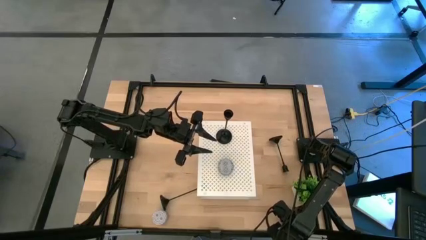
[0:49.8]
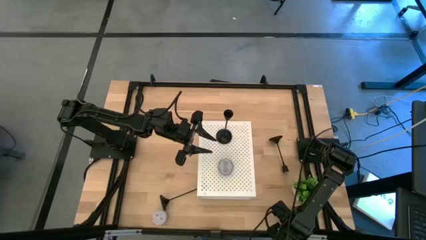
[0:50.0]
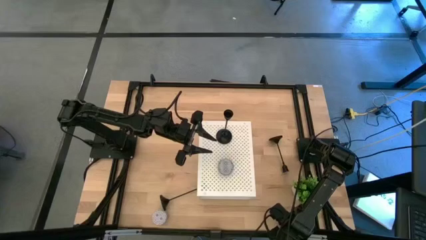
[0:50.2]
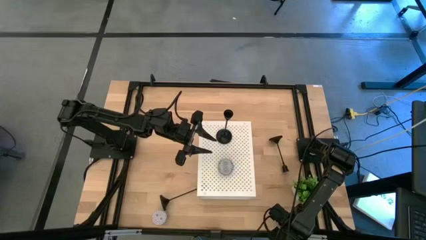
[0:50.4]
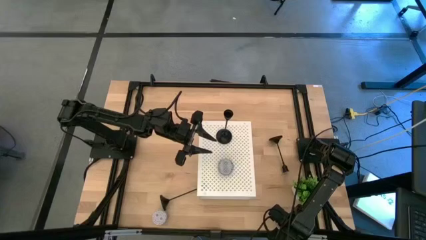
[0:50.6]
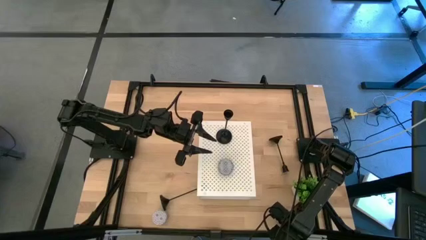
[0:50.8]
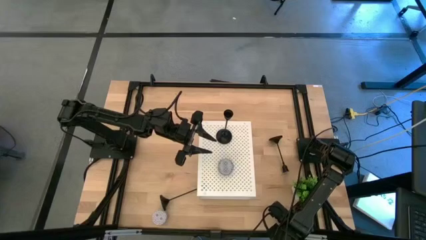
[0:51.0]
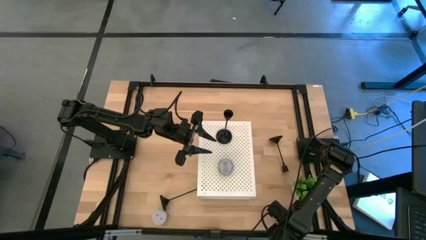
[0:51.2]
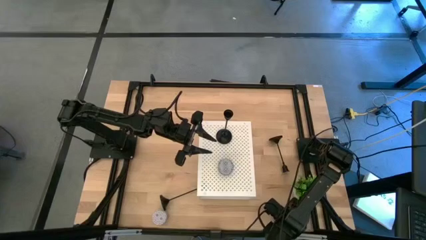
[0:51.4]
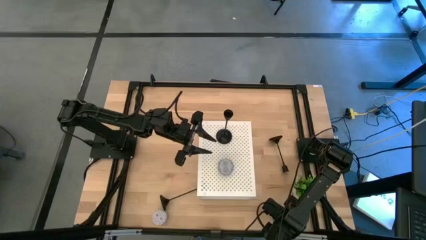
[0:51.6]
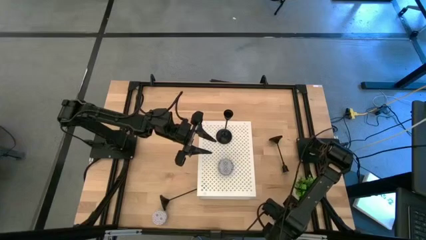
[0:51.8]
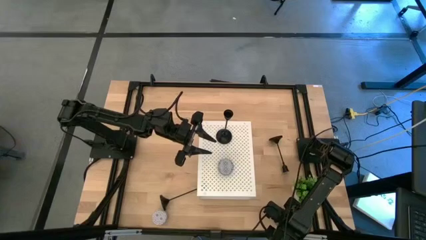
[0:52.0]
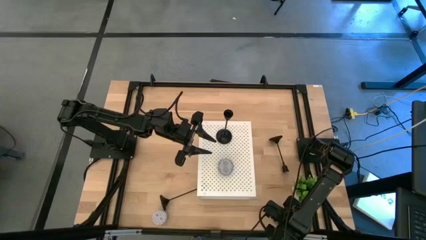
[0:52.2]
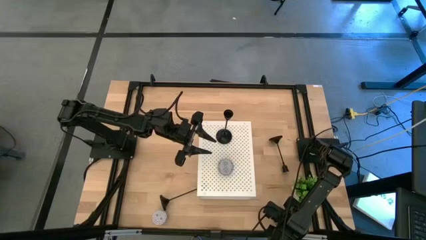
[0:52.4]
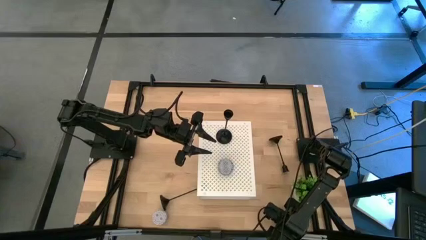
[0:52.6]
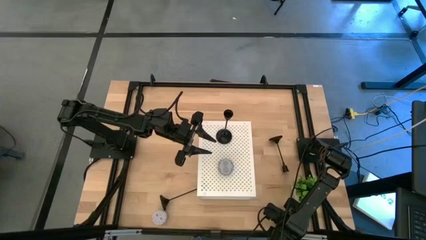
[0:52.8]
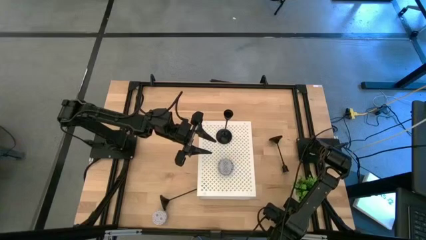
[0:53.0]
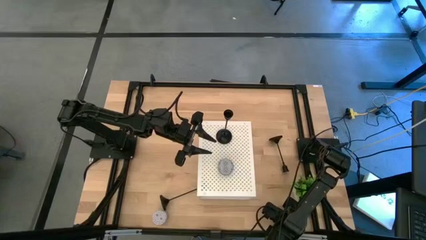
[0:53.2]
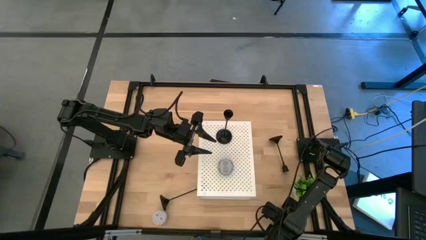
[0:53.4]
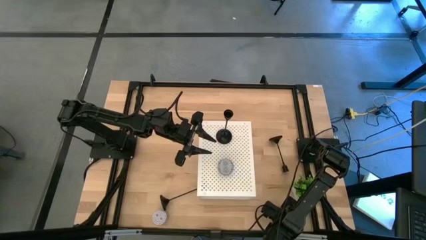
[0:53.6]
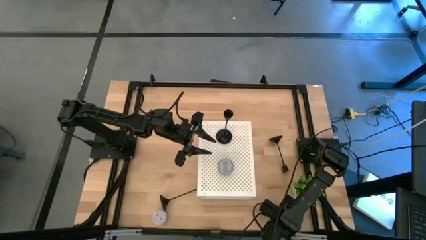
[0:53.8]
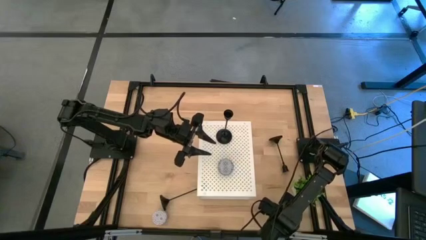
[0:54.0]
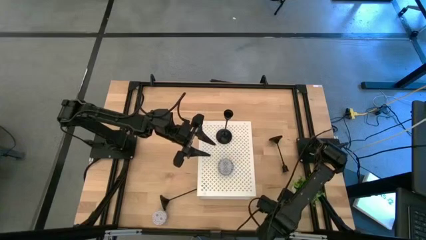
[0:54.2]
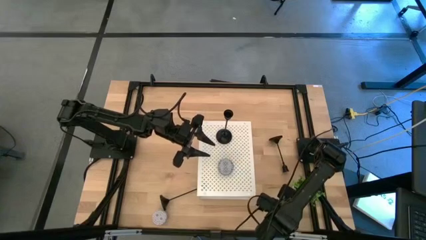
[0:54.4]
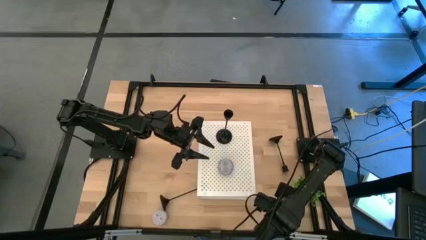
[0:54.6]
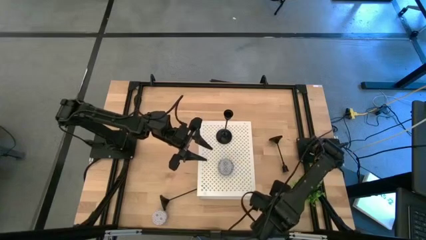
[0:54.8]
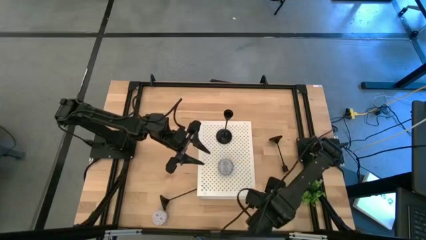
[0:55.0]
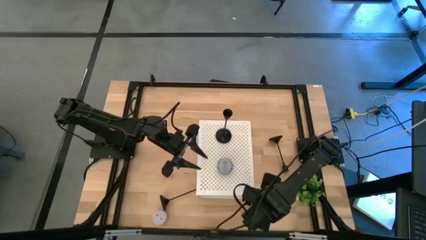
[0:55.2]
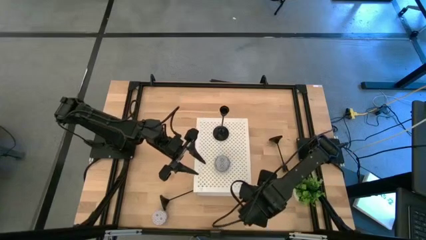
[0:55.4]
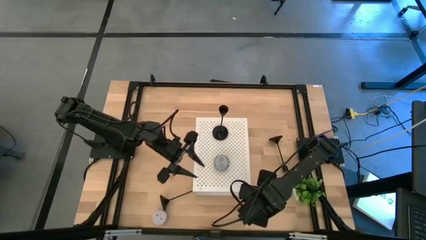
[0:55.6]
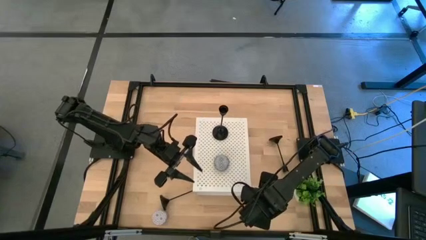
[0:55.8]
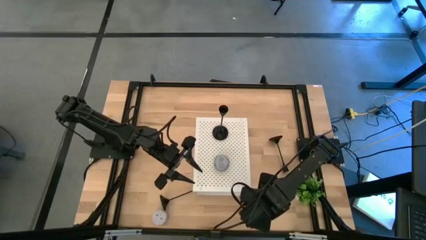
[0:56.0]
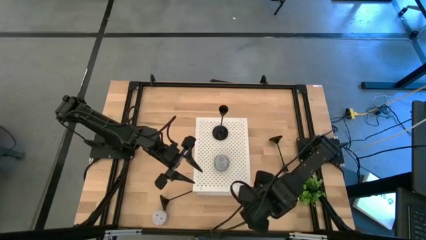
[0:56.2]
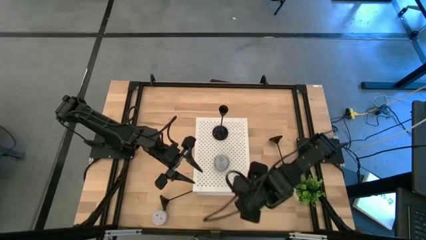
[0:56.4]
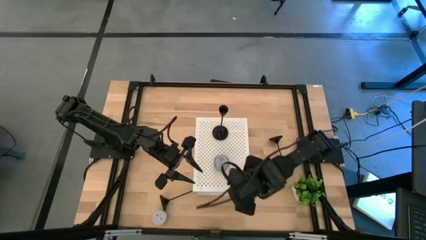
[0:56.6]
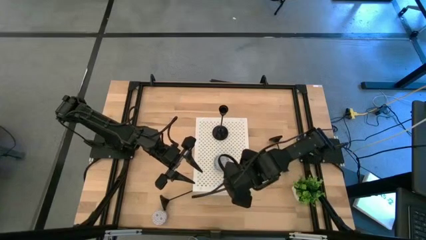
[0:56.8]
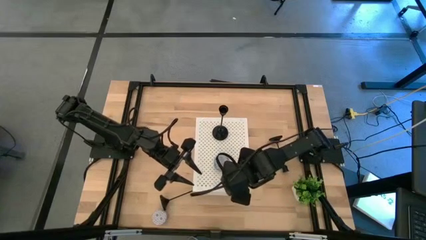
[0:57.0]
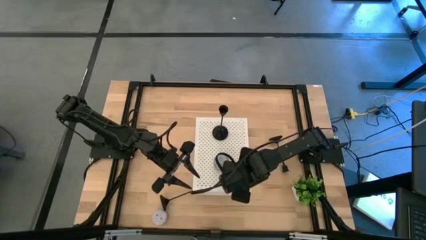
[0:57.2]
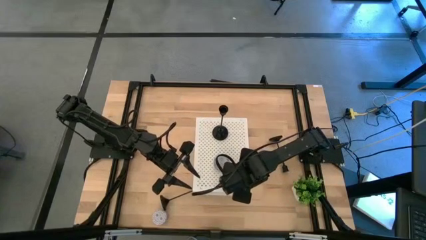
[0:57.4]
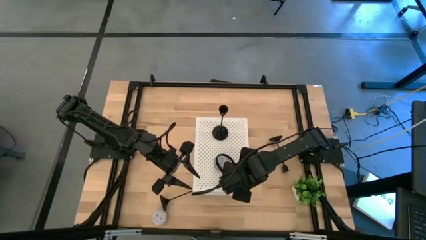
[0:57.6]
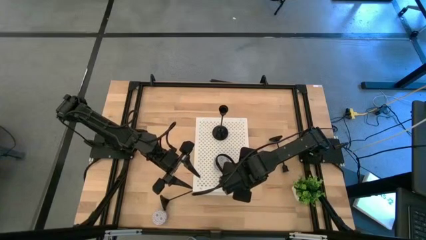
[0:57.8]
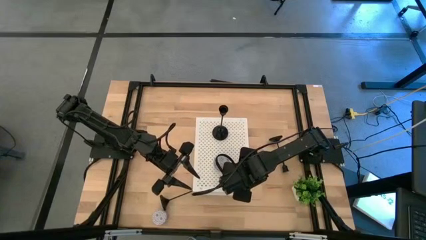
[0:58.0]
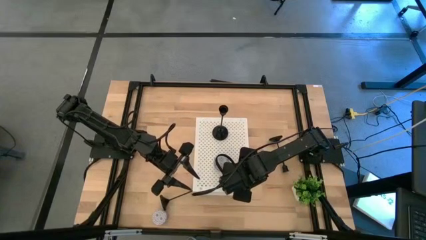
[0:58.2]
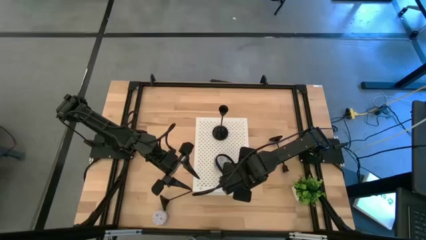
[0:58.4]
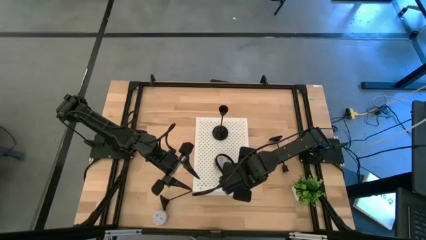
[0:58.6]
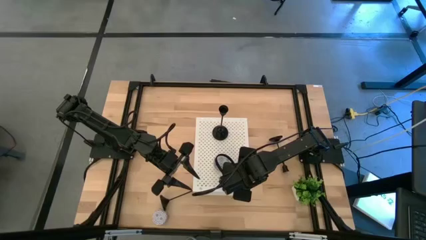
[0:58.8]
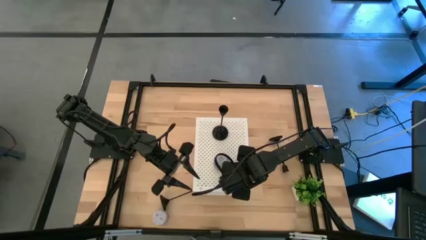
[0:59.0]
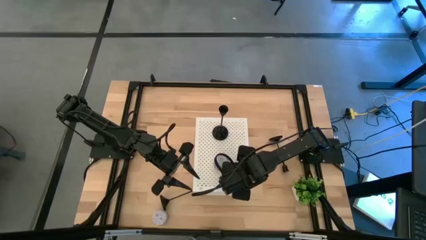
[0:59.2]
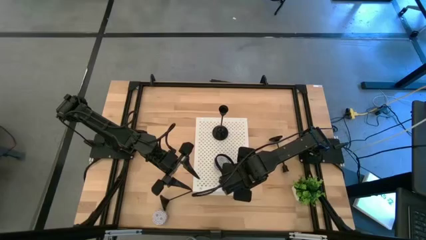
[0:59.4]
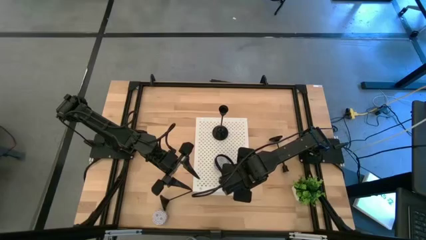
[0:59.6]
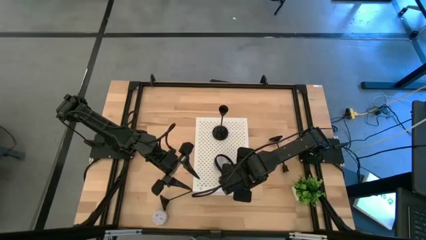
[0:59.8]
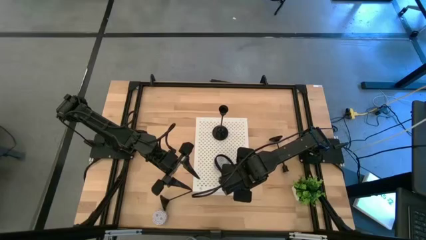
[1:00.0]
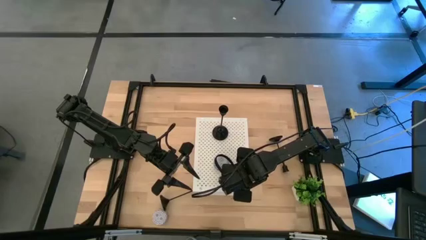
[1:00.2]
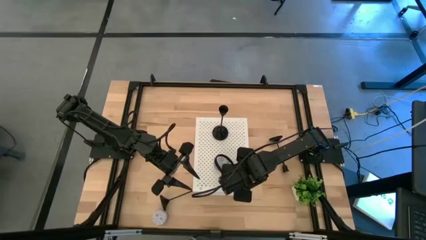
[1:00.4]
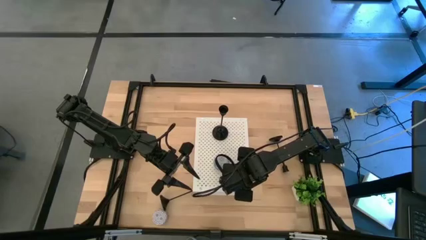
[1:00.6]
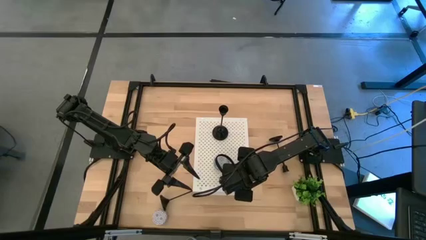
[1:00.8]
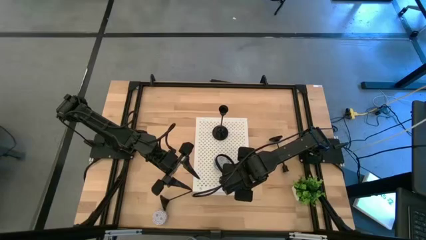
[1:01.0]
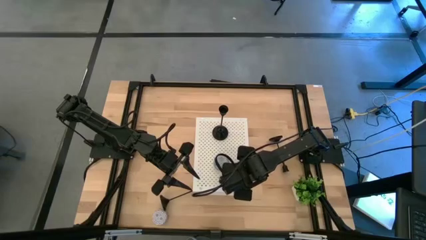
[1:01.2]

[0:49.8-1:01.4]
Task: Pick & Place candle stick holders
Put the purple scented candle on the shelf

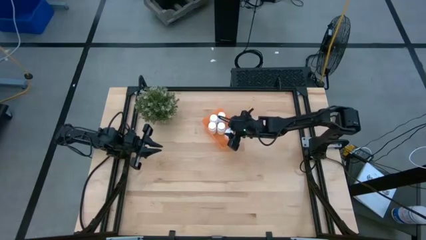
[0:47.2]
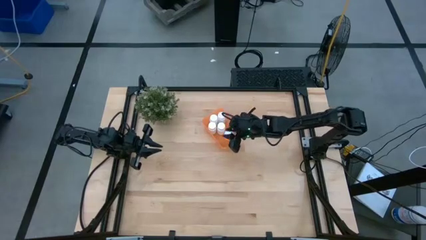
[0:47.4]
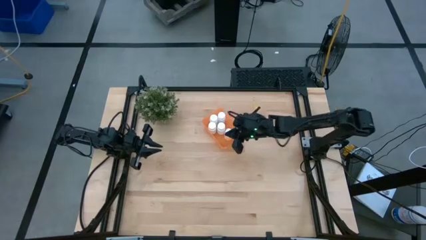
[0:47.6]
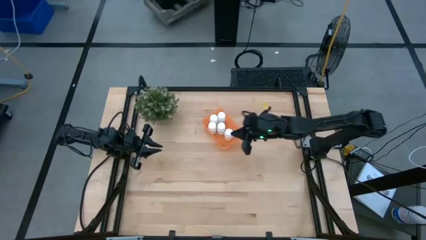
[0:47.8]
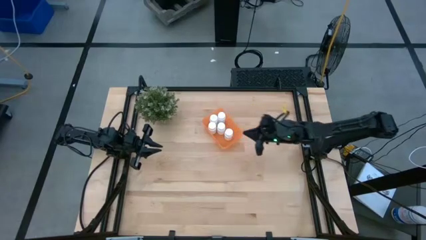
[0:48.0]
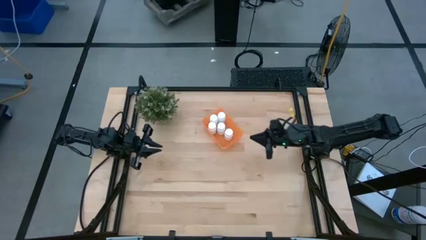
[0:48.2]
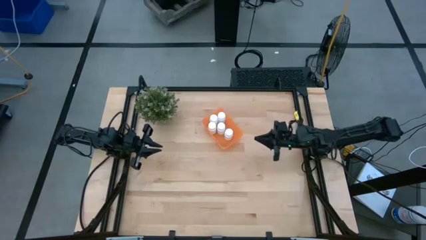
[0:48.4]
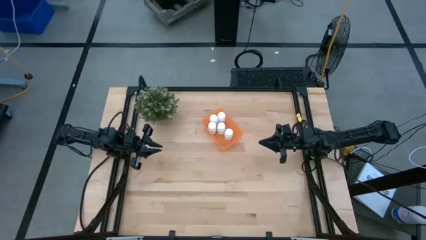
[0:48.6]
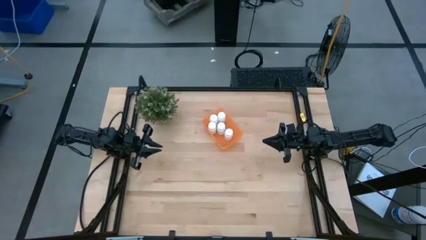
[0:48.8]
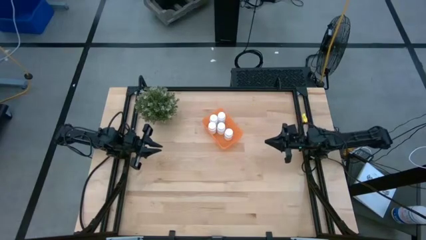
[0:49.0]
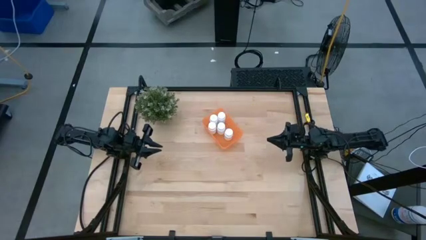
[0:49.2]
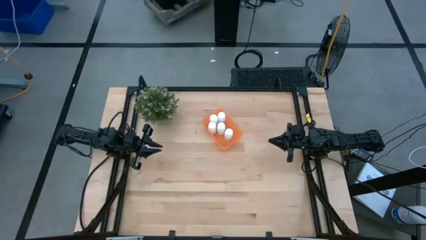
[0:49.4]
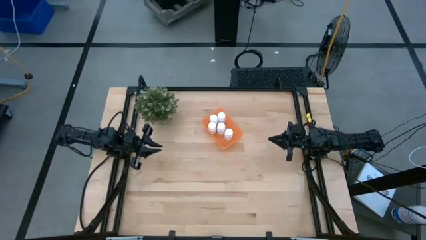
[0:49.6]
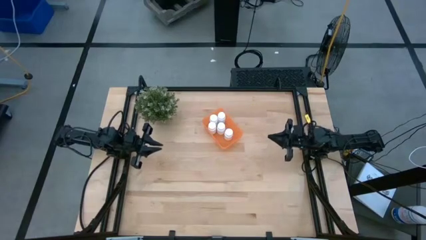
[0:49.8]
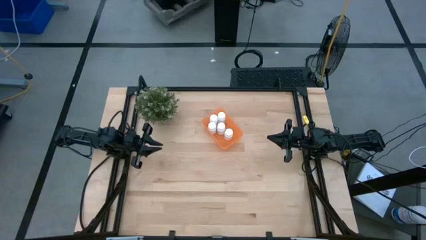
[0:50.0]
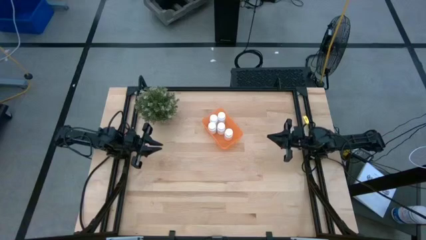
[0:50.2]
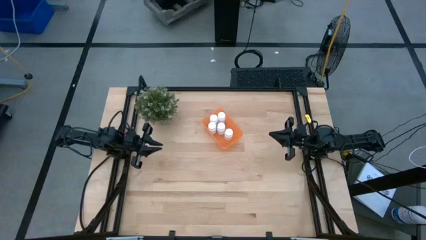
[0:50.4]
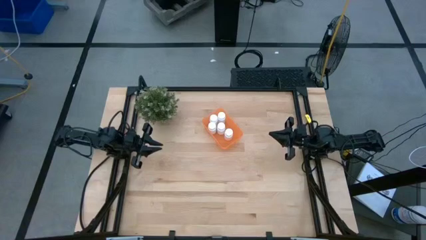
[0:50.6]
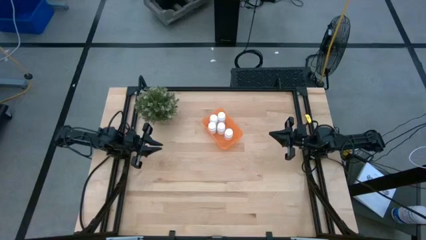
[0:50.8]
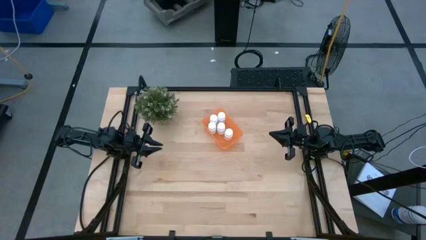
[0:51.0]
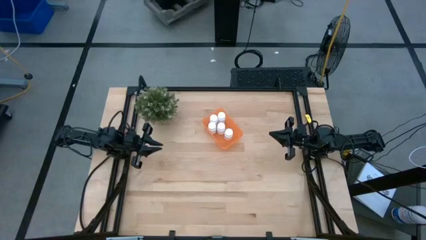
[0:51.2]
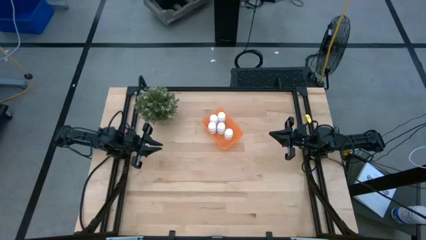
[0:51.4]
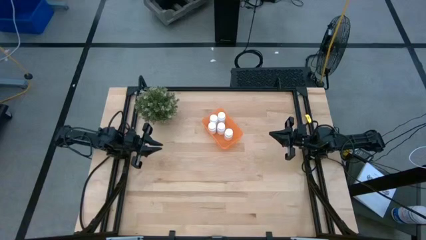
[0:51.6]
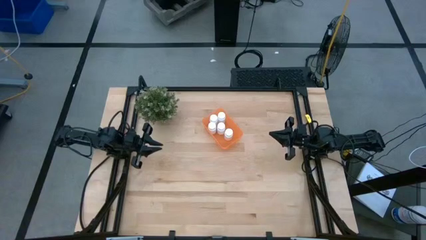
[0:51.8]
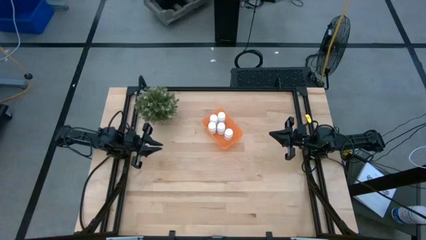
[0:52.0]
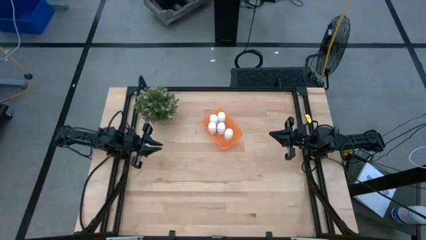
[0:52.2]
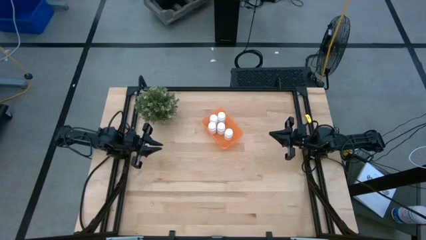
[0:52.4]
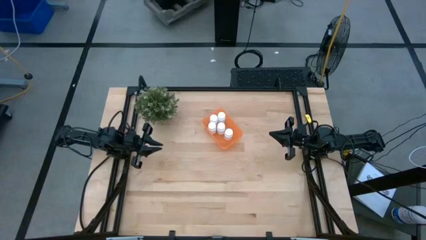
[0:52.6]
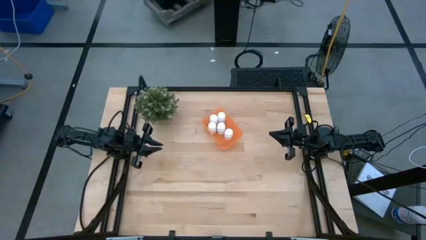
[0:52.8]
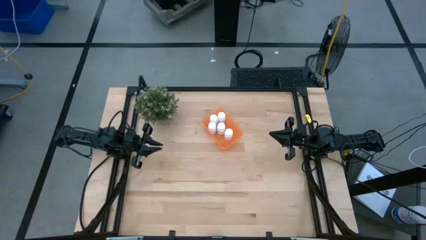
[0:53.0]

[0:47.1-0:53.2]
Task: Pick and place pill bottles into a basket
Return to Home Position
